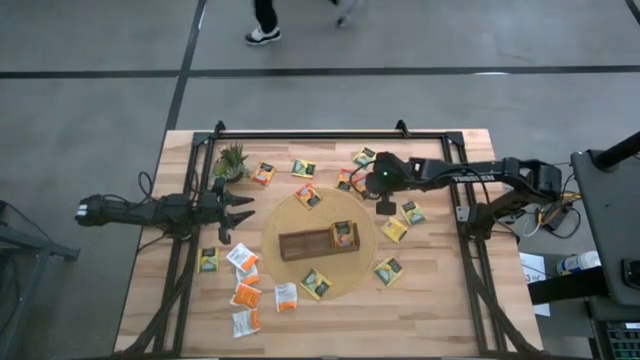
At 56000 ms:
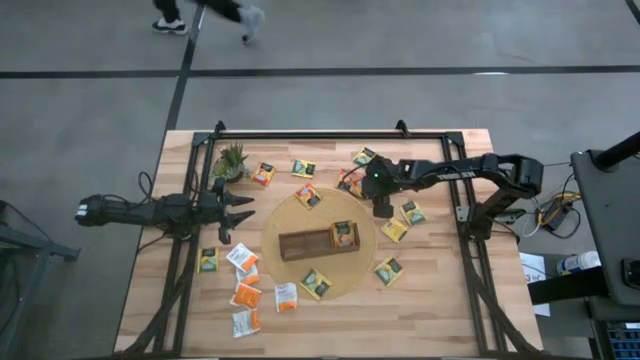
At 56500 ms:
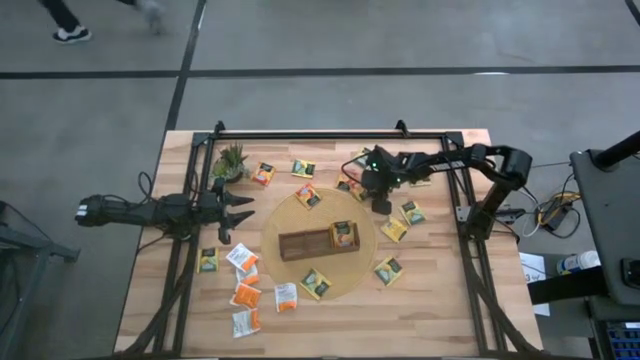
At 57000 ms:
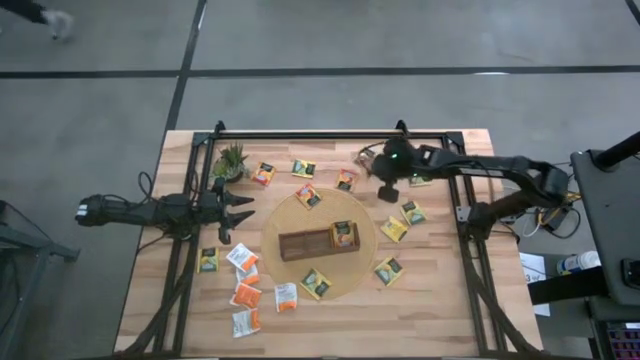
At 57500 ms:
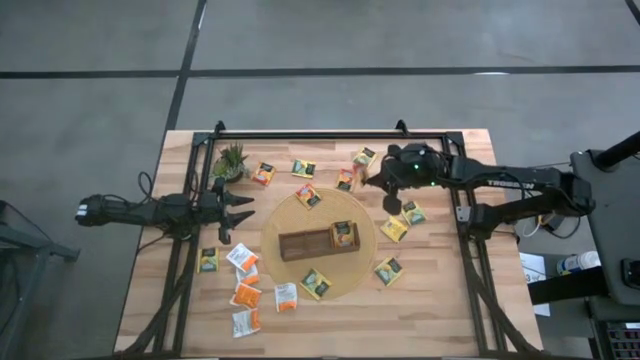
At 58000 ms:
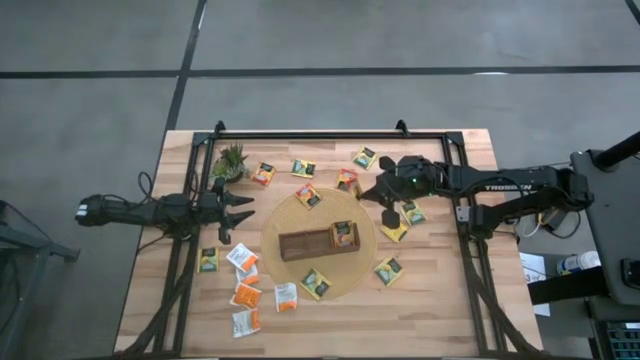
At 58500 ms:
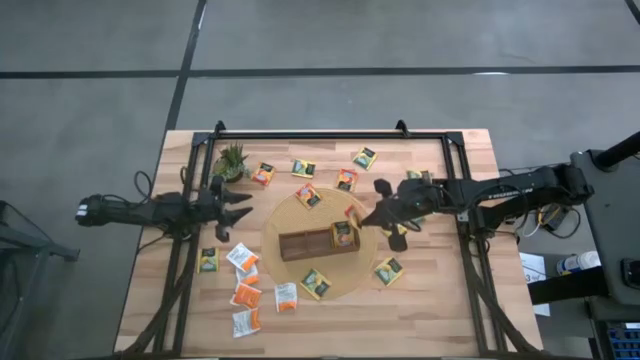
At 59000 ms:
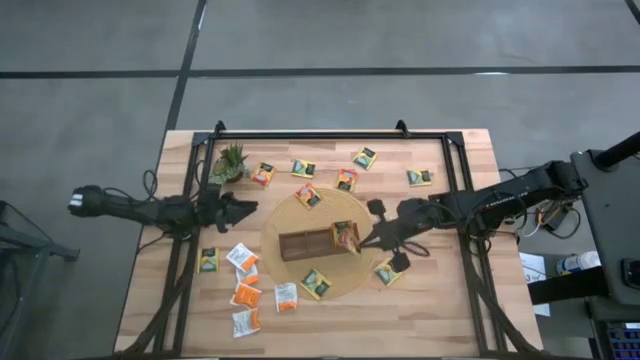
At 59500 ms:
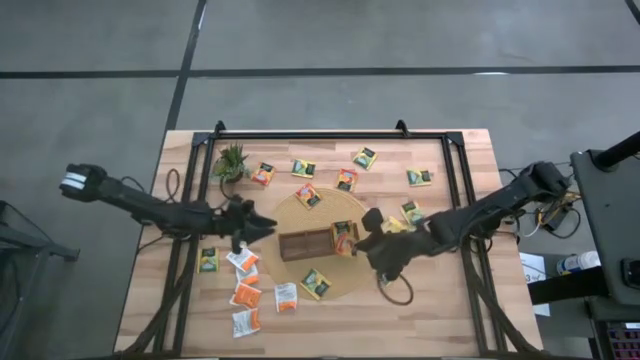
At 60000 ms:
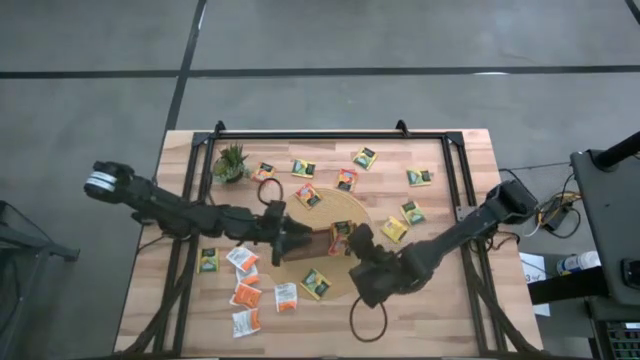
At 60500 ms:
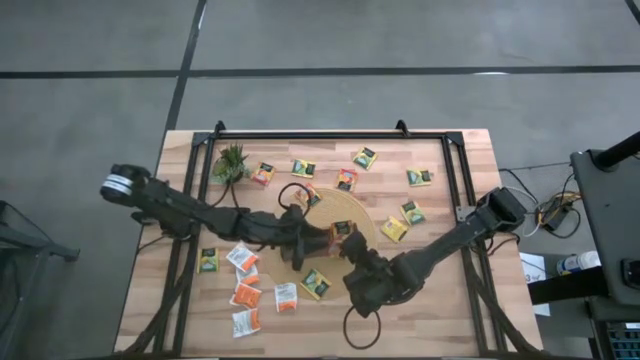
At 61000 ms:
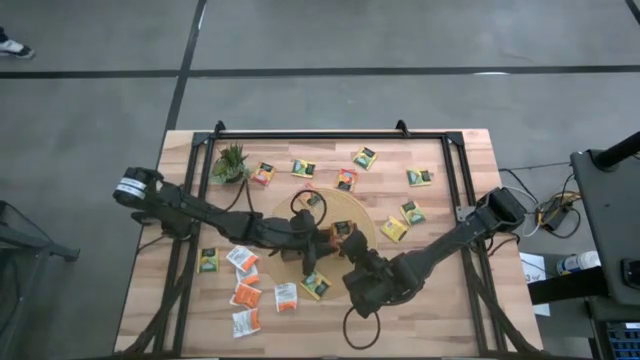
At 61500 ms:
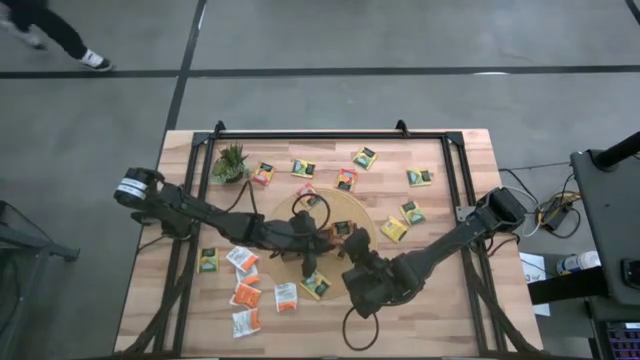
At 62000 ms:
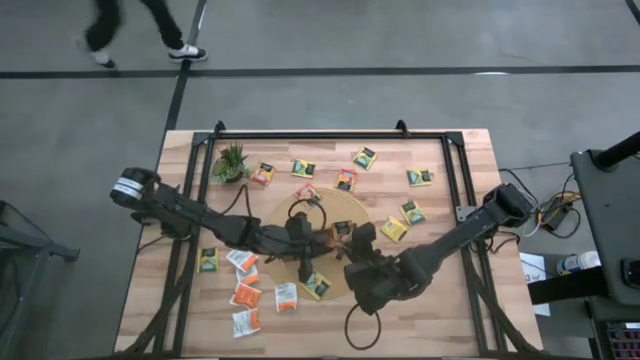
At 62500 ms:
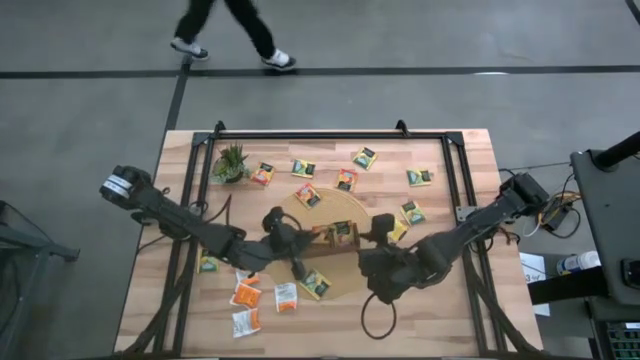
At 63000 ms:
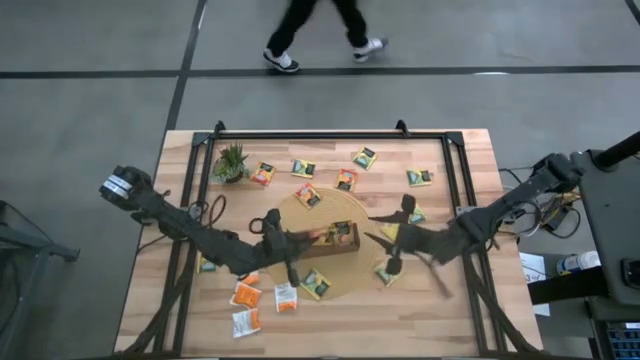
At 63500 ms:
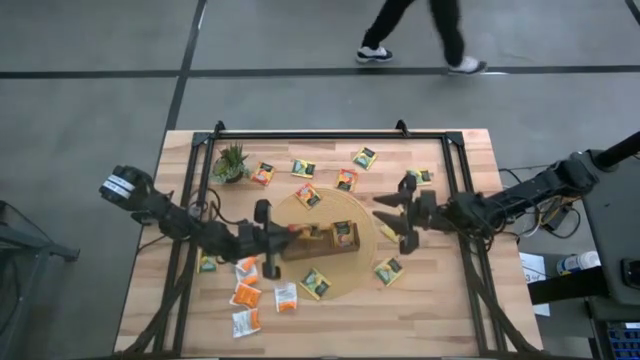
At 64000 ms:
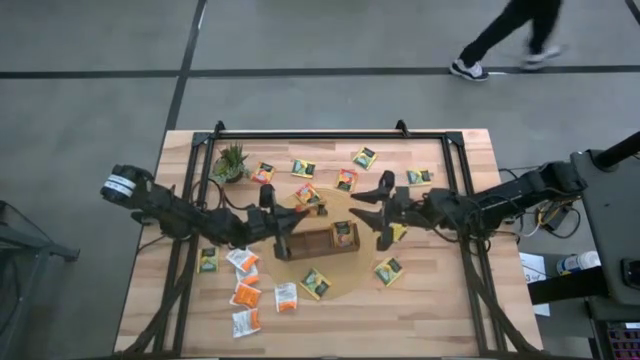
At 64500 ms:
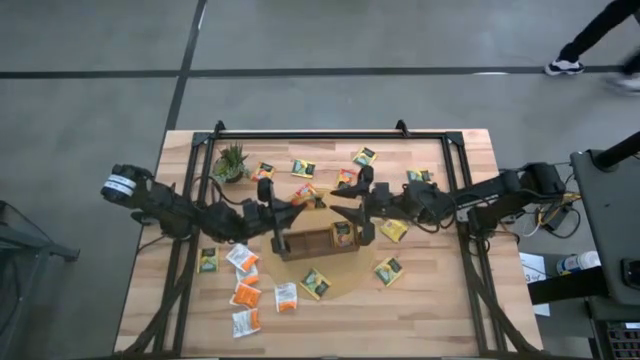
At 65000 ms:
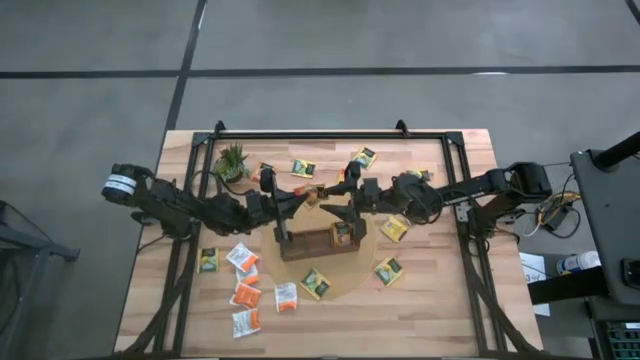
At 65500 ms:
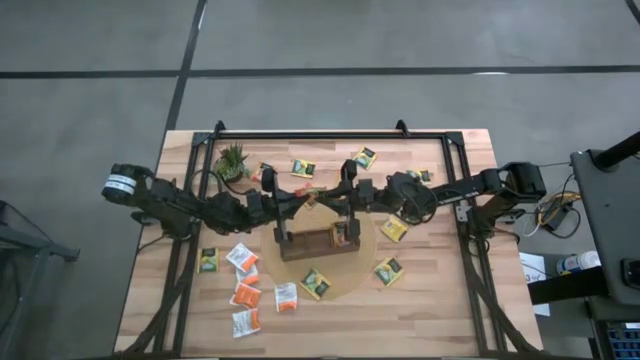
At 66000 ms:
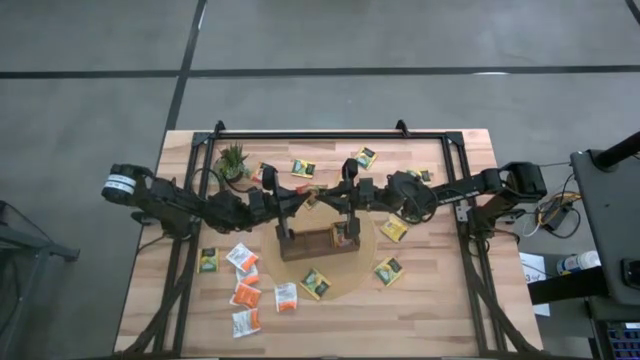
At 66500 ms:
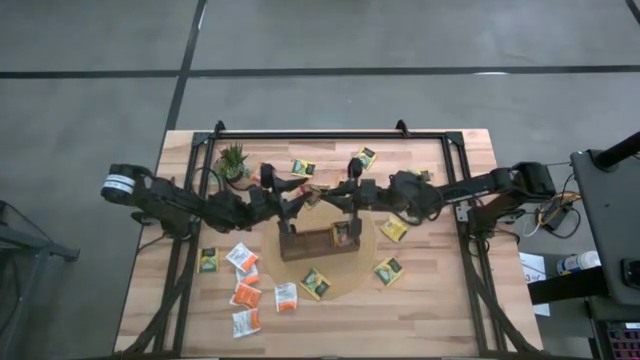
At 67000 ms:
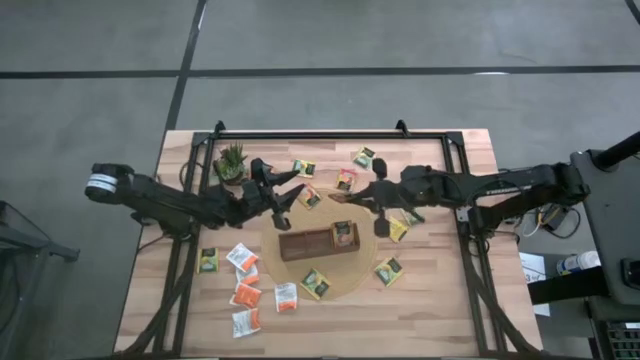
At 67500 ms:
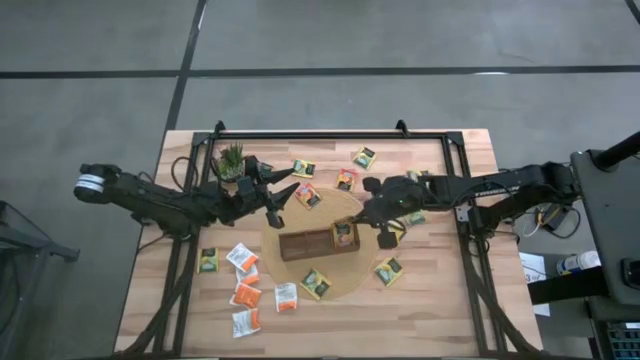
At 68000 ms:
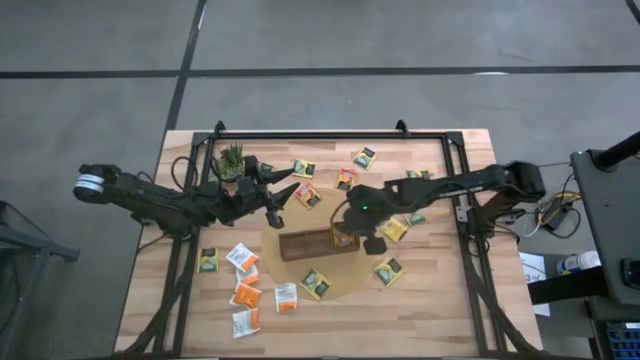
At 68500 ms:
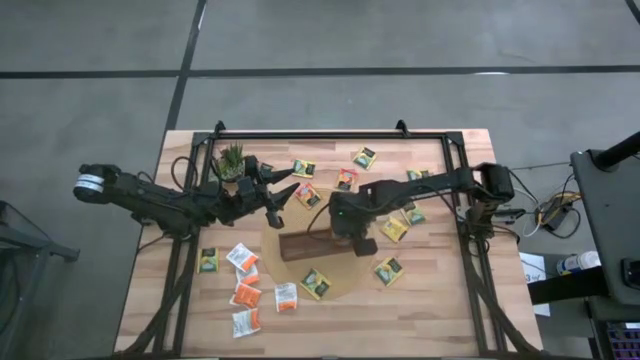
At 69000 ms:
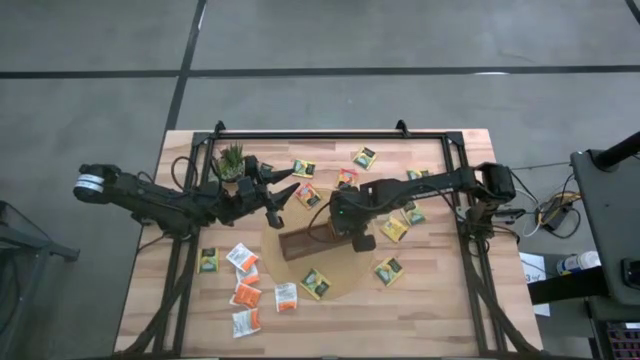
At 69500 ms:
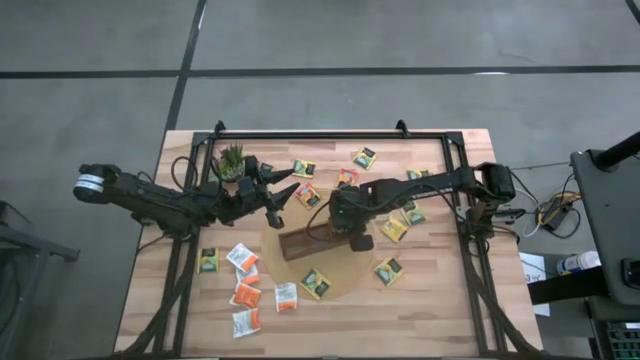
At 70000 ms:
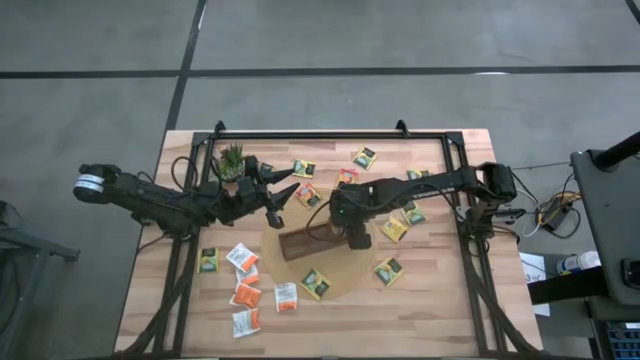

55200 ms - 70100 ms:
Task: Pick & Place Tea
Put the orange tea bag into the right section of the wooden organizer

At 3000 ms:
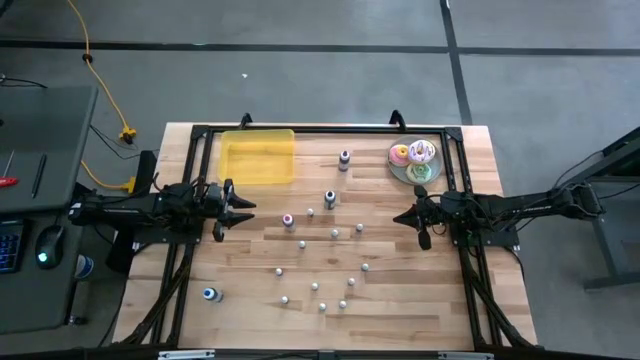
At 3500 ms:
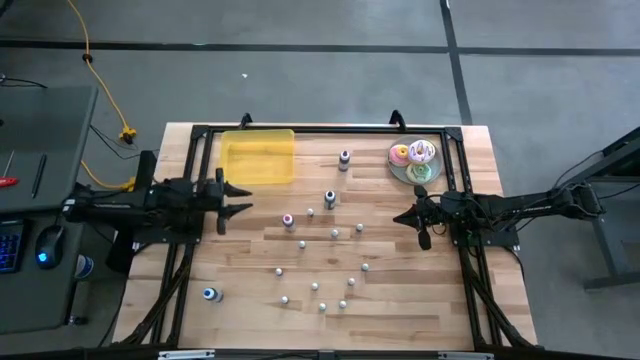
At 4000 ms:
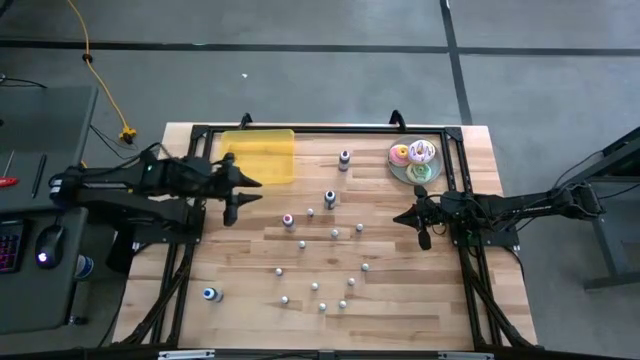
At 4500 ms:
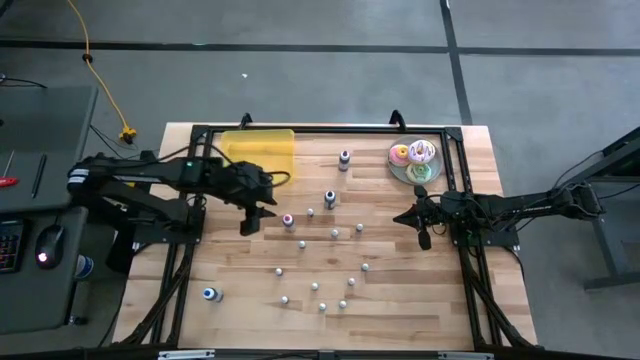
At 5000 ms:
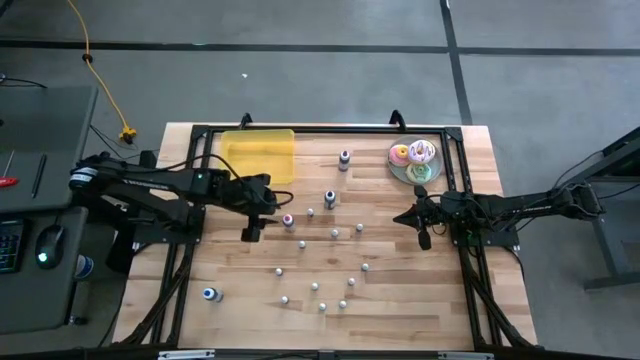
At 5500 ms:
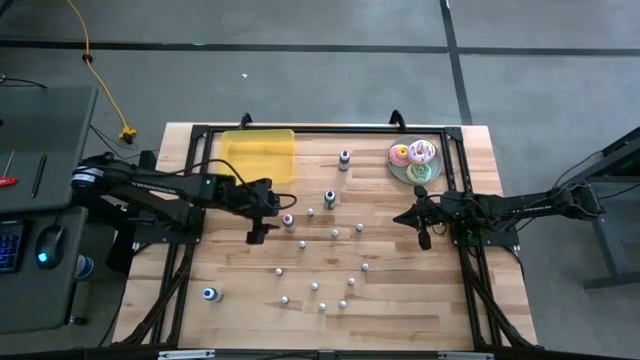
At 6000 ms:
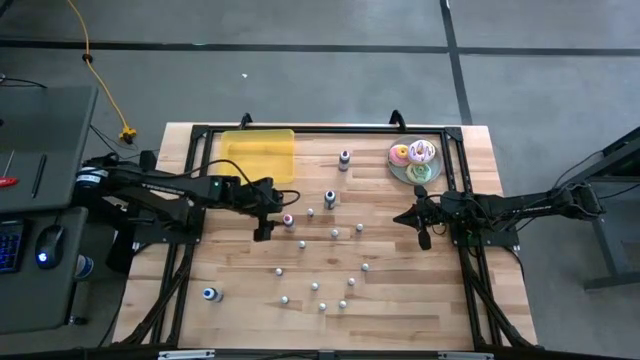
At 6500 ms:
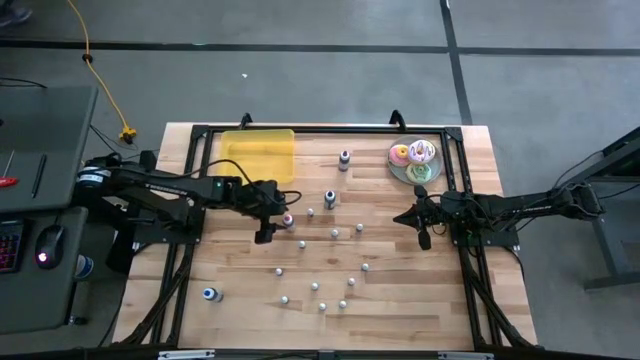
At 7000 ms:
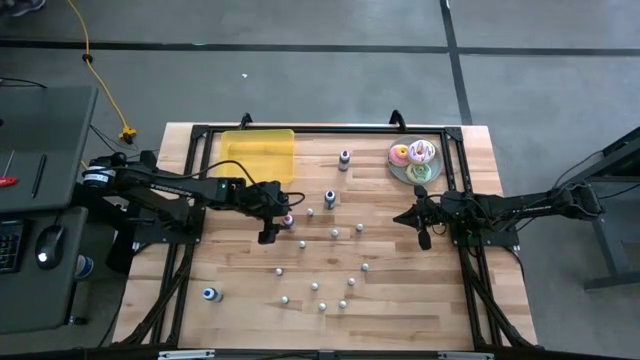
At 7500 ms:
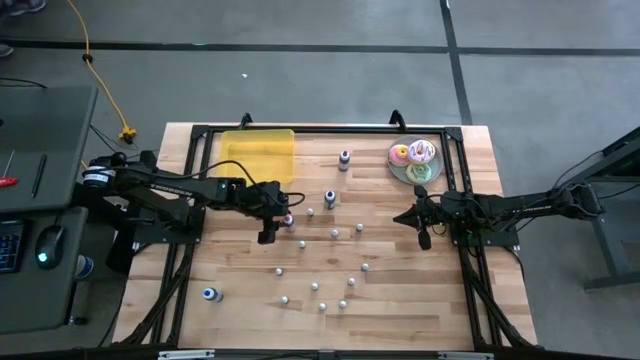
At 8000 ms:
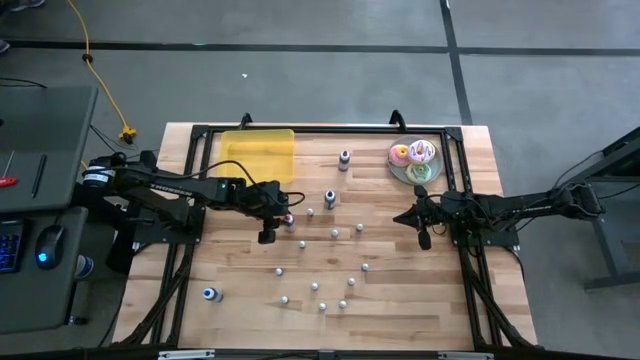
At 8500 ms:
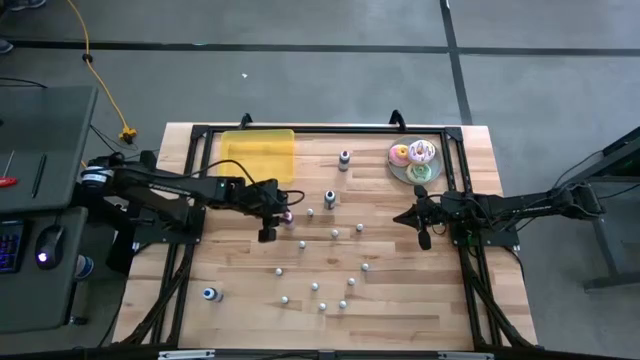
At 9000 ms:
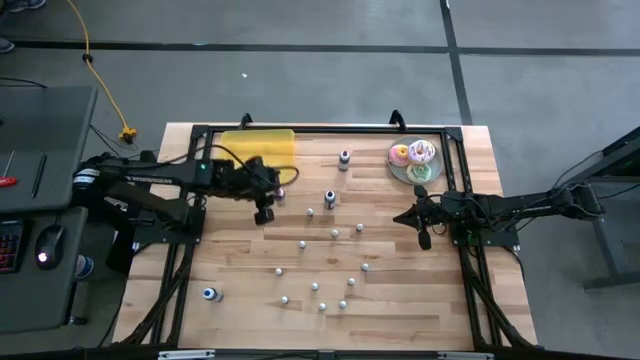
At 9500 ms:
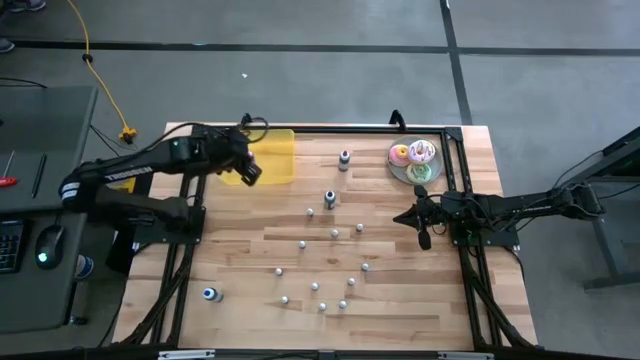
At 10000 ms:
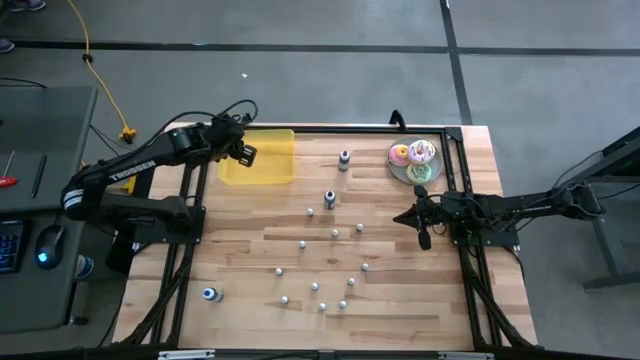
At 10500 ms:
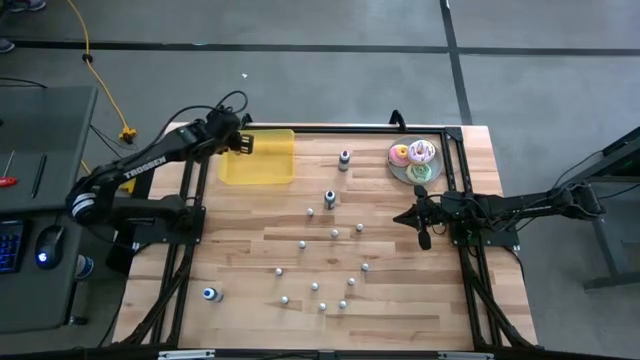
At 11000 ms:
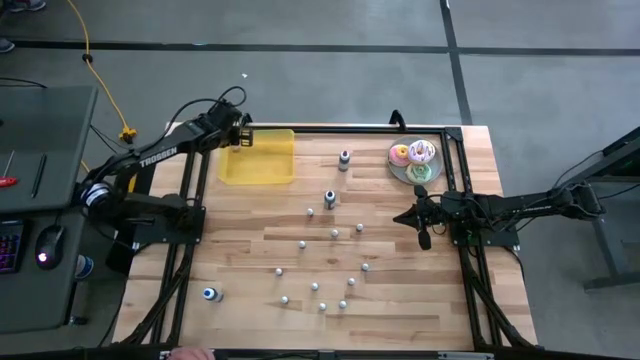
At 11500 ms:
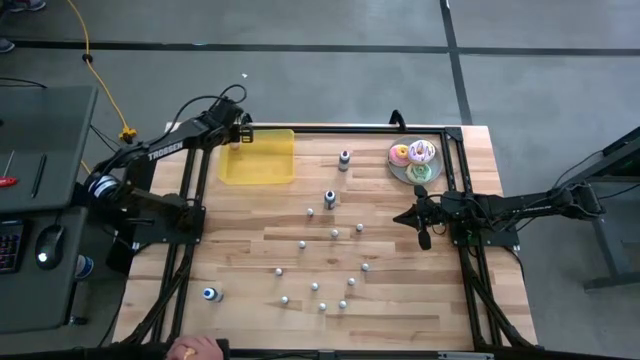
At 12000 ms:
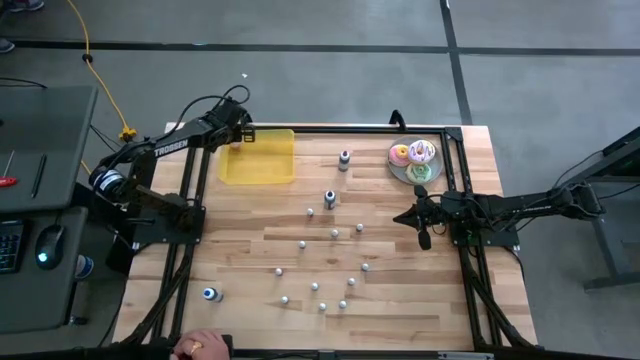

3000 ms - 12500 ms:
Task: Pick & Place food coloring
Put the large red food coloring bottle into the yellow bin
